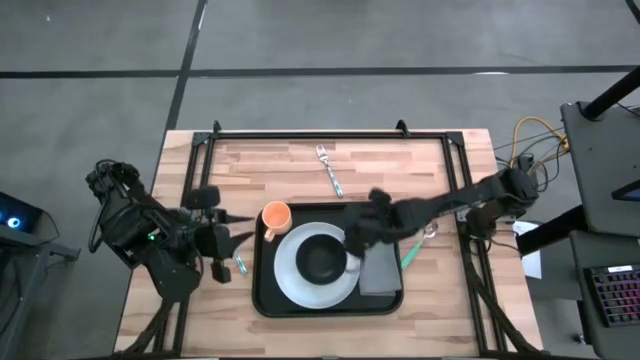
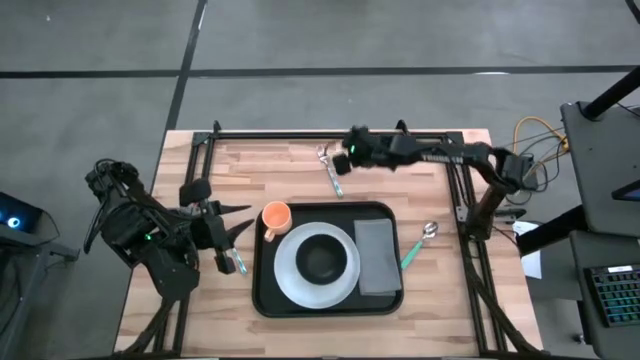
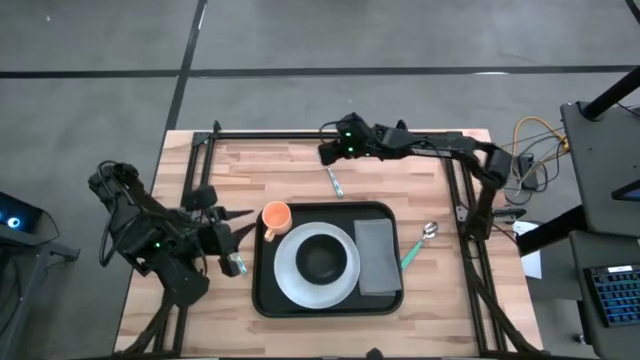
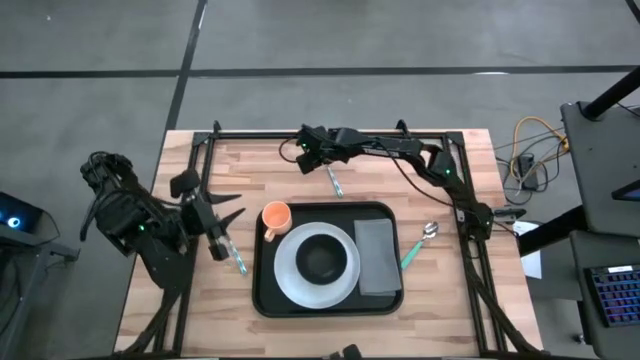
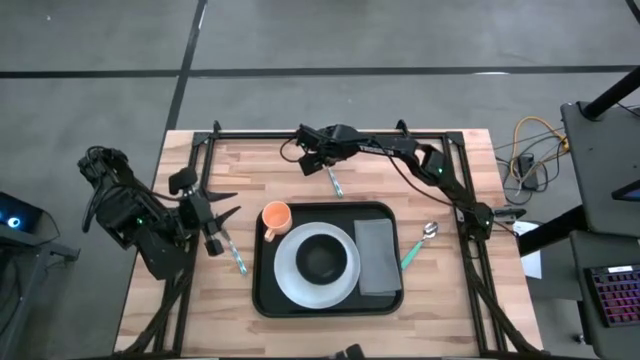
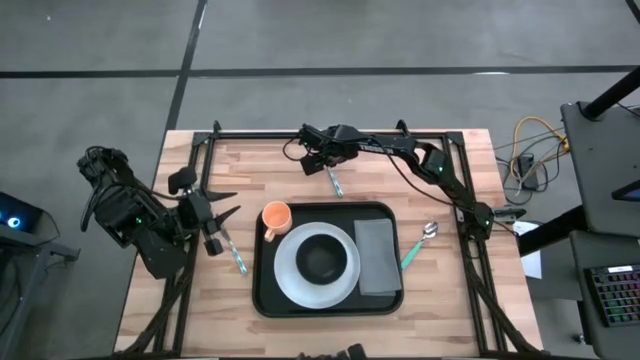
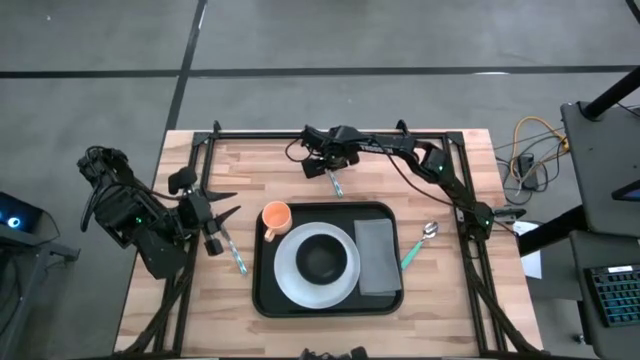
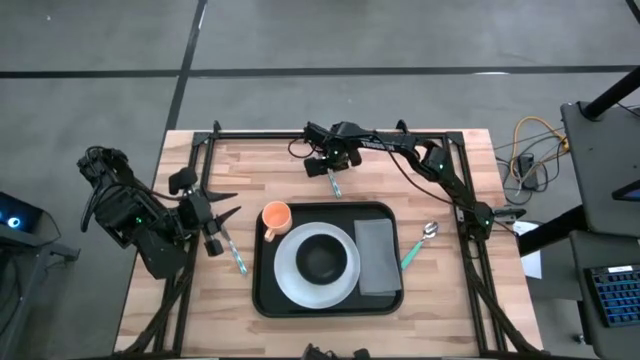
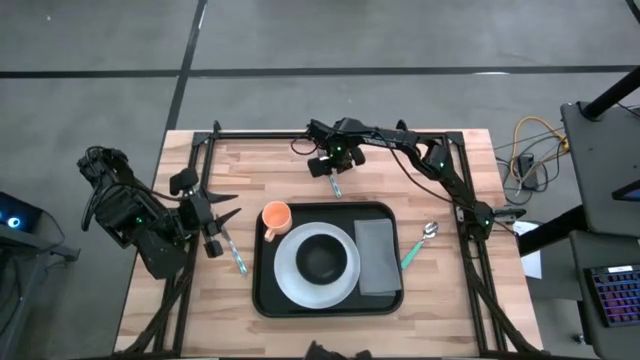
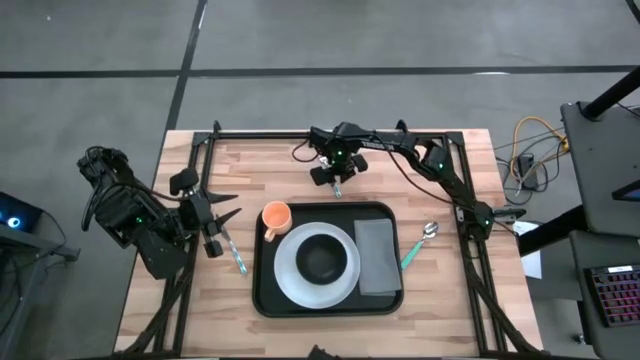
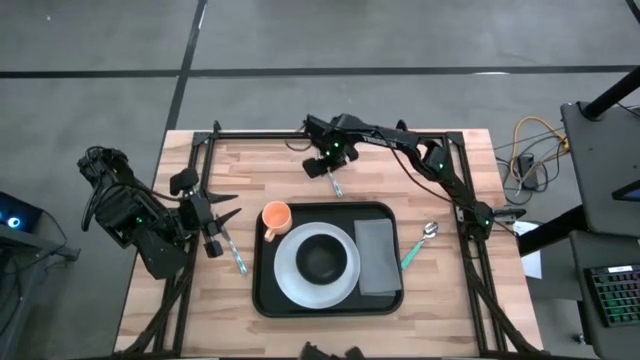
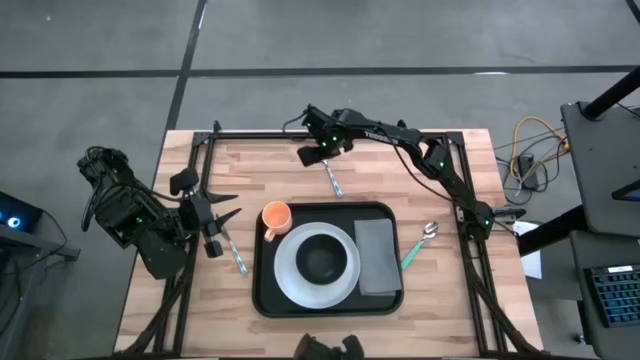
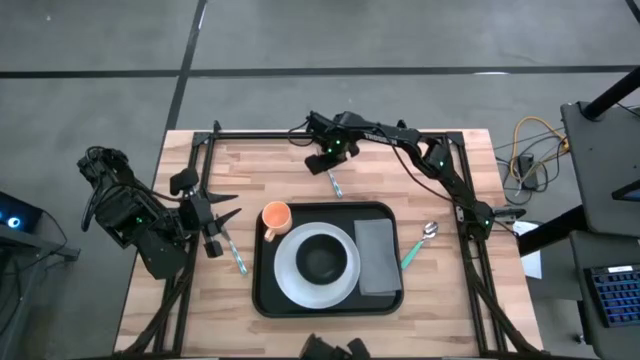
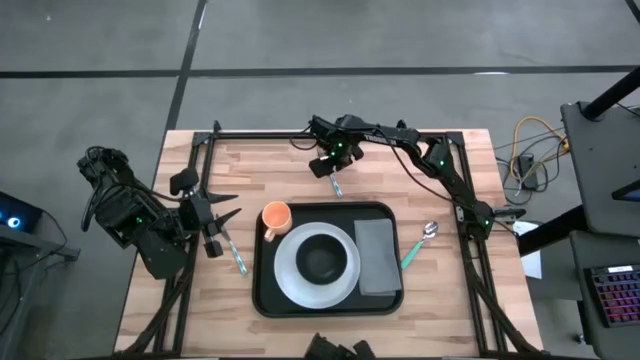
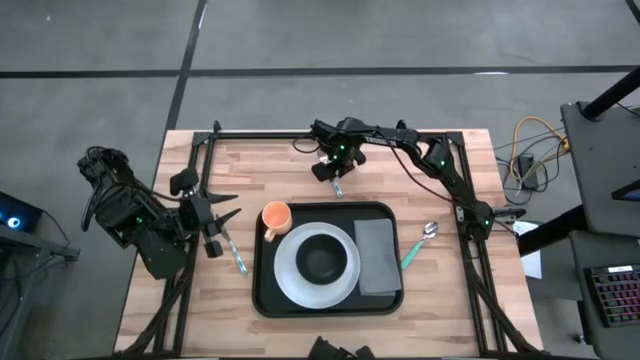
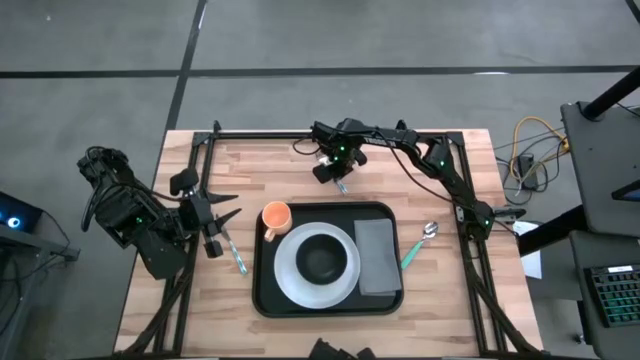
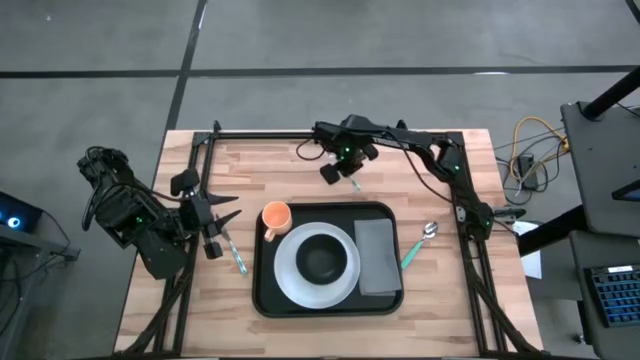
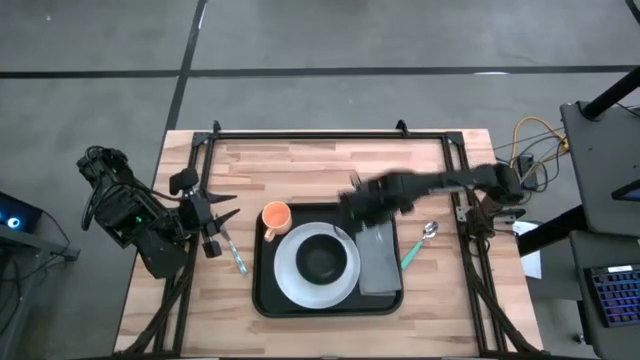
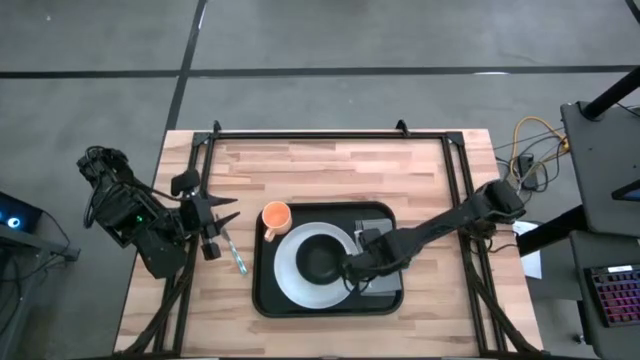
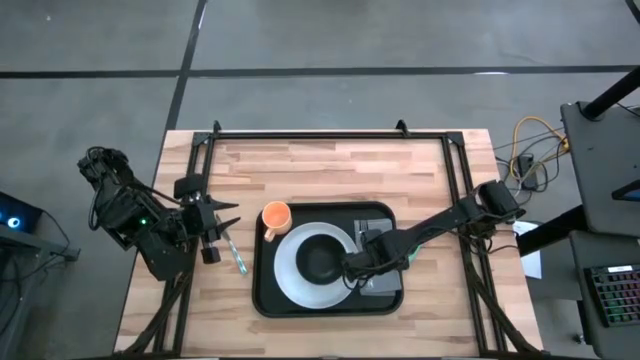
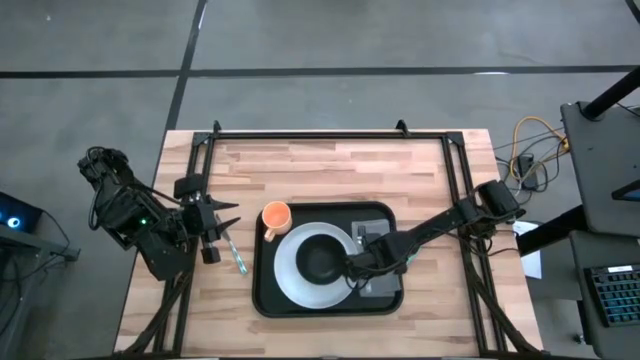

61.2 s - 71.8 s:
Task: Set up tray
Put the green fork on top of the gray napkin

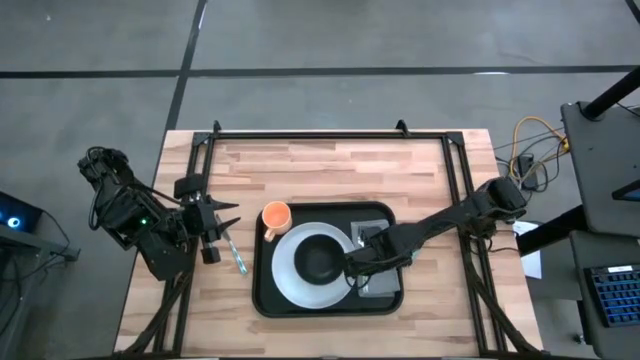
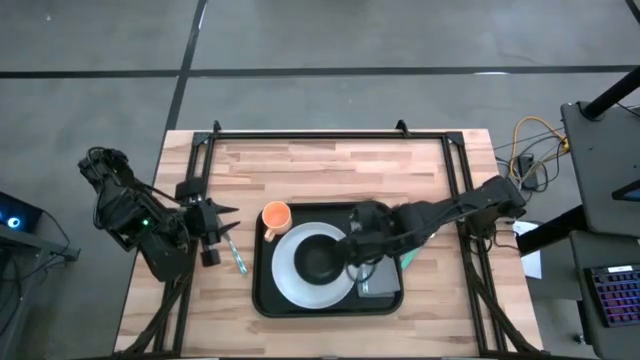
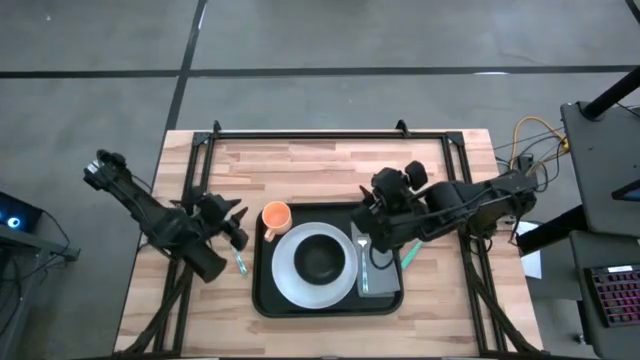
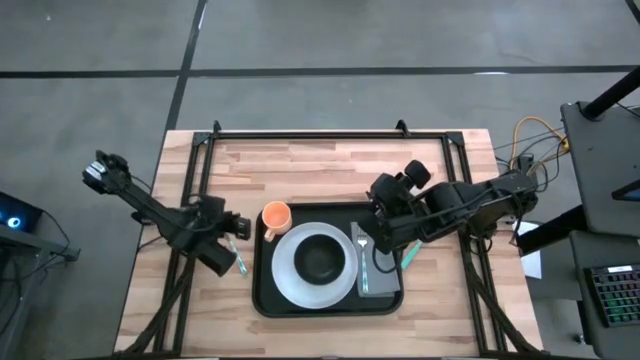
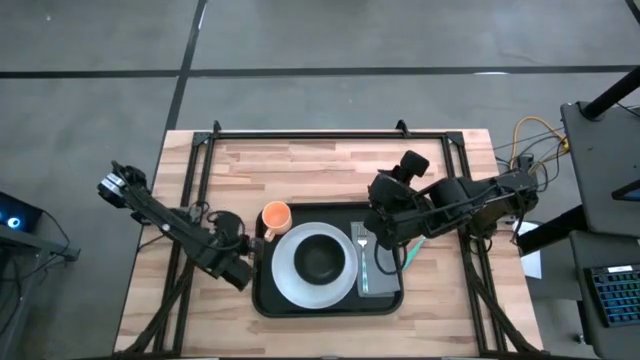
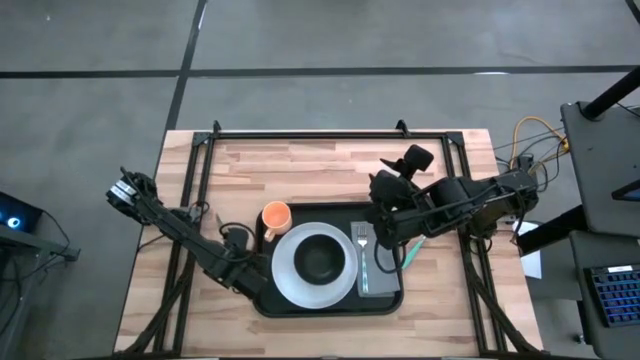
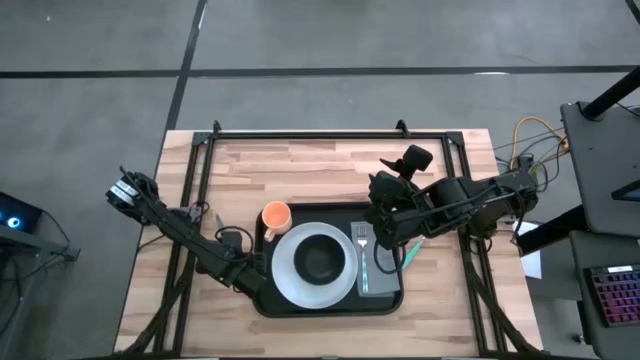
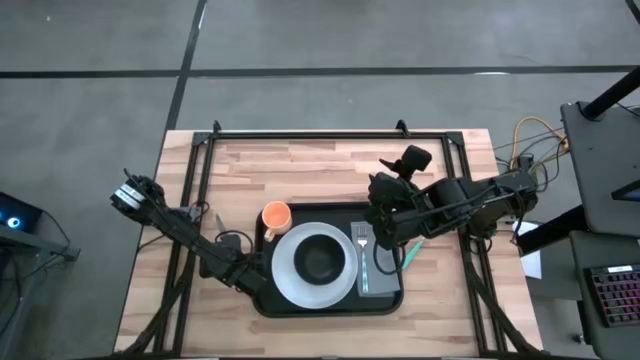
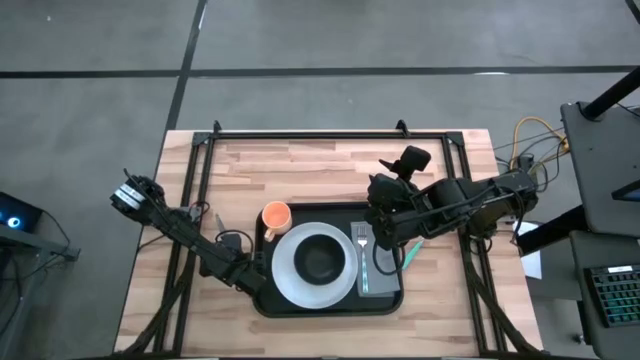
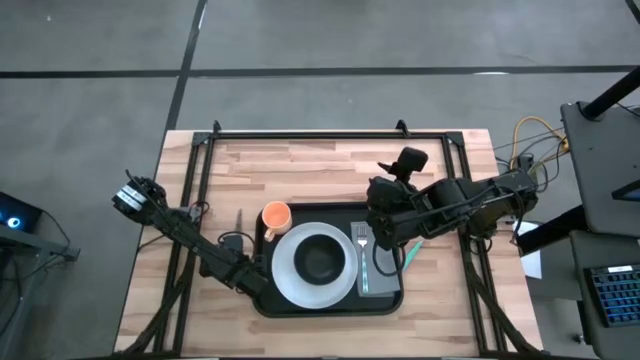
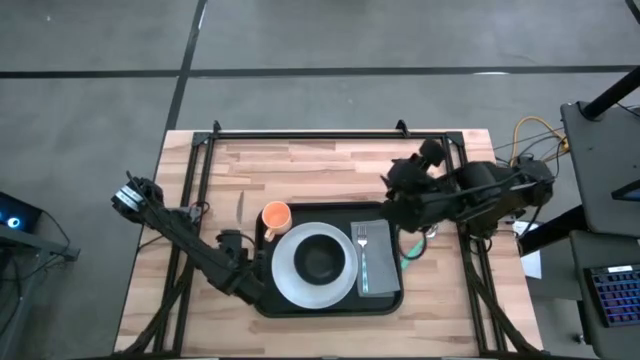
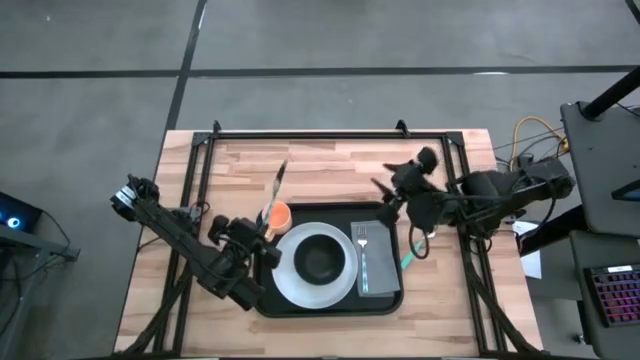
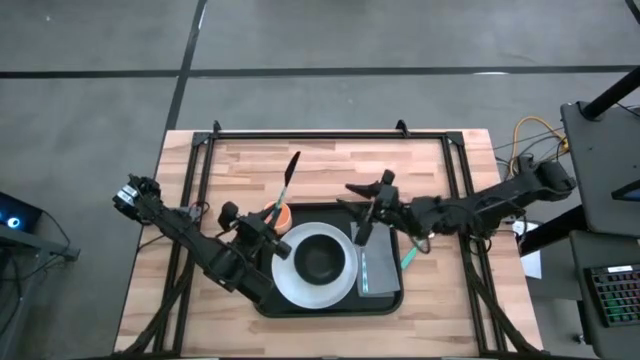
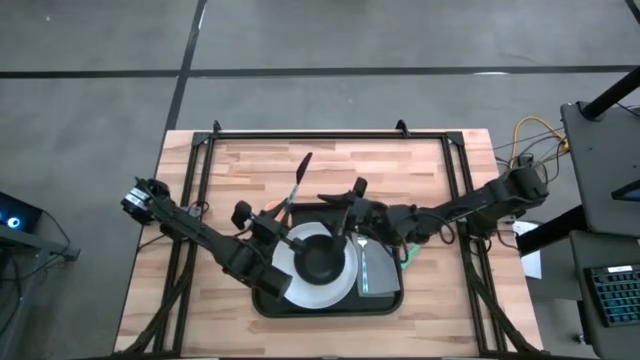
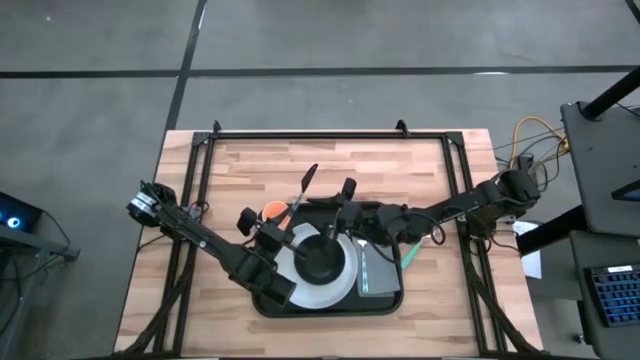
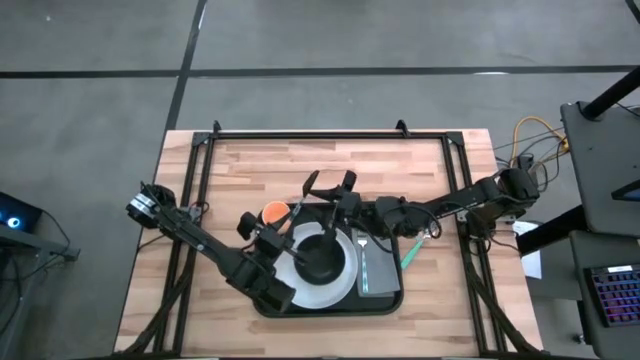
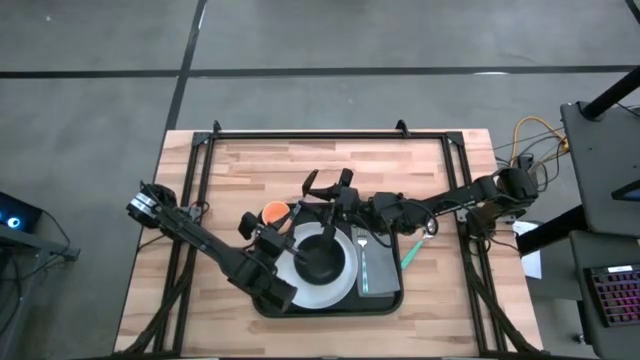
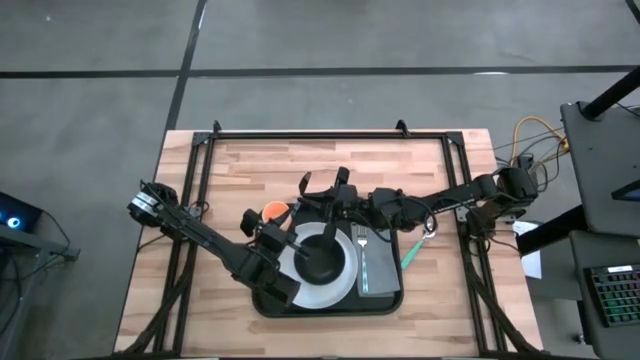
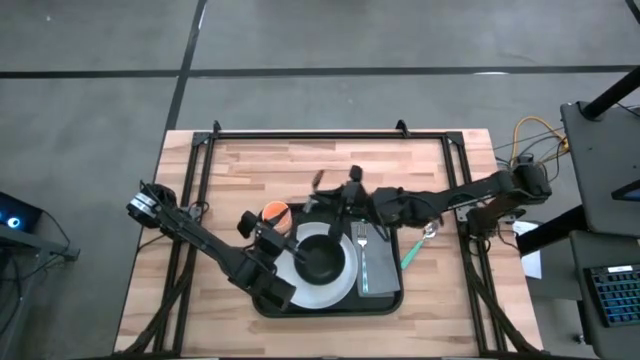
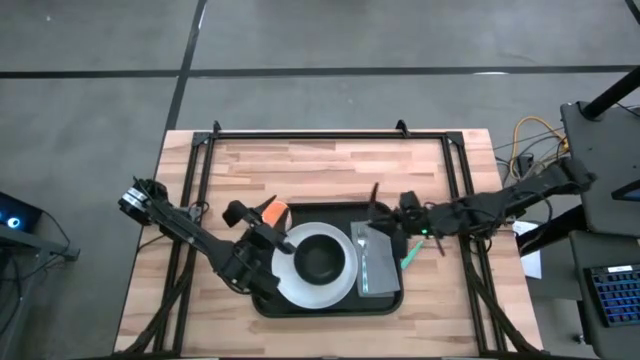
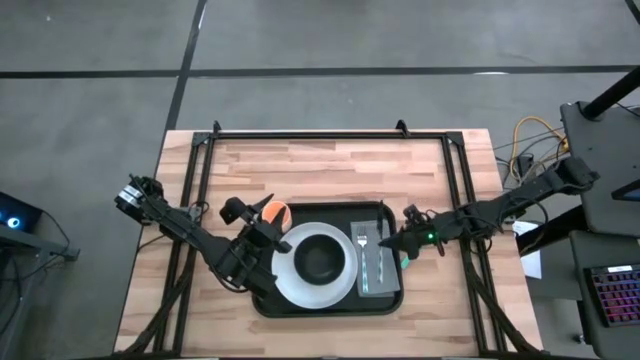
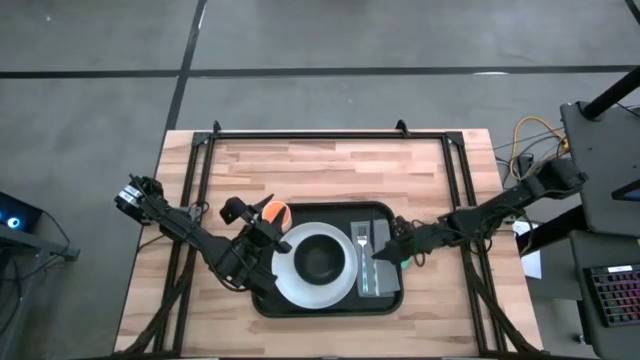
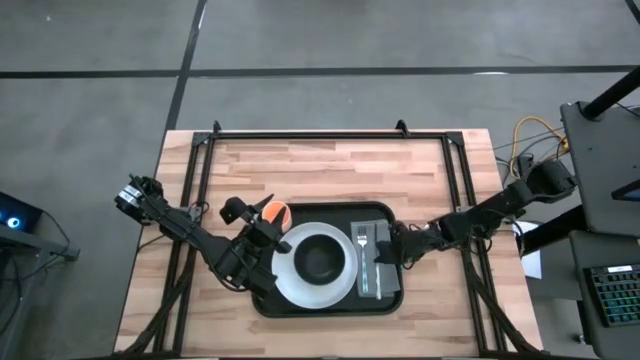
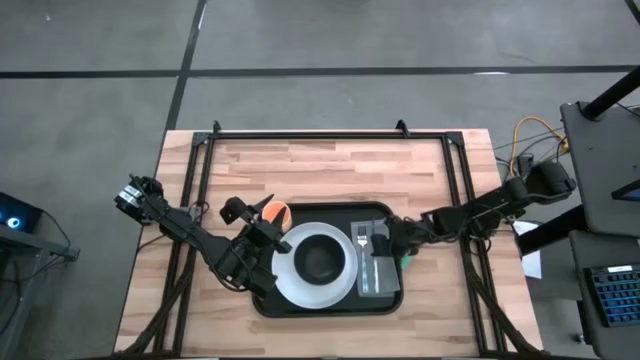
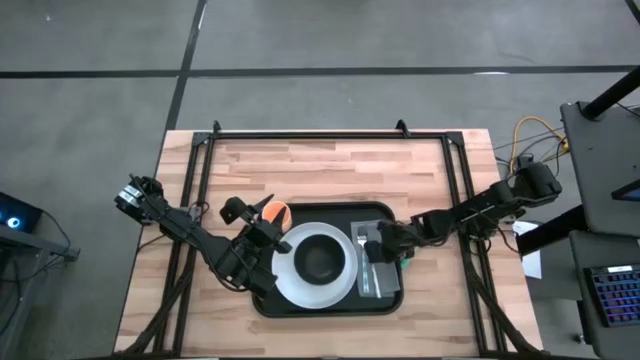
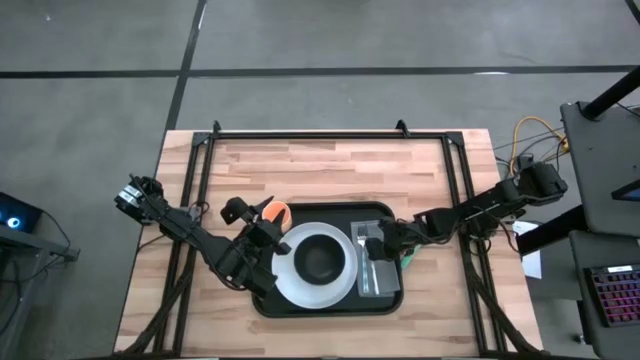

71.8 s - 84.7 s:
Put the green knife to the right of the green fork on the gray napkin
